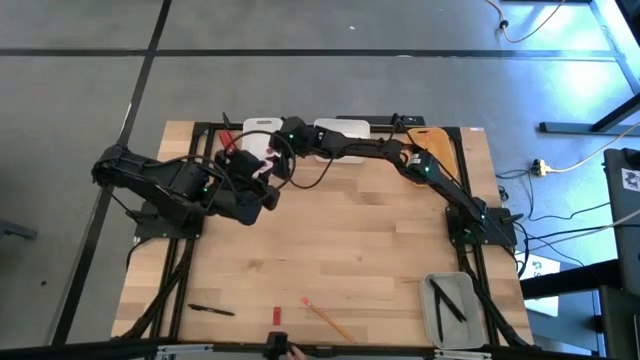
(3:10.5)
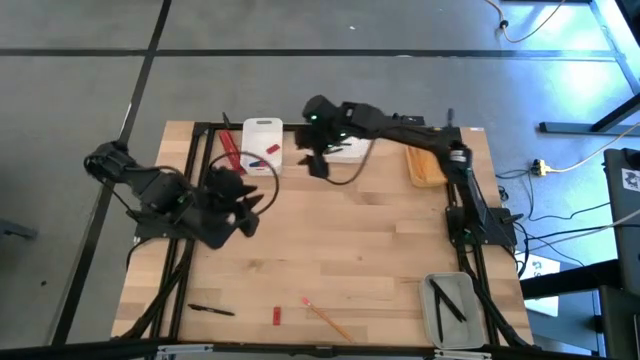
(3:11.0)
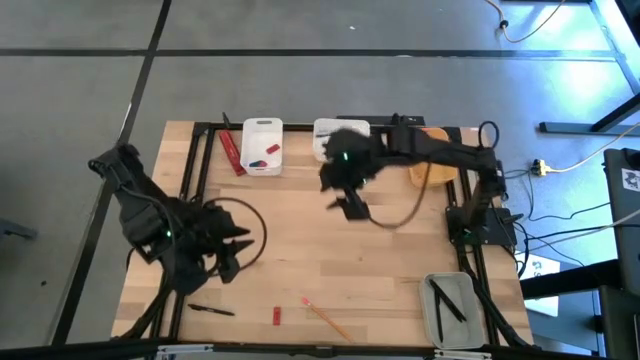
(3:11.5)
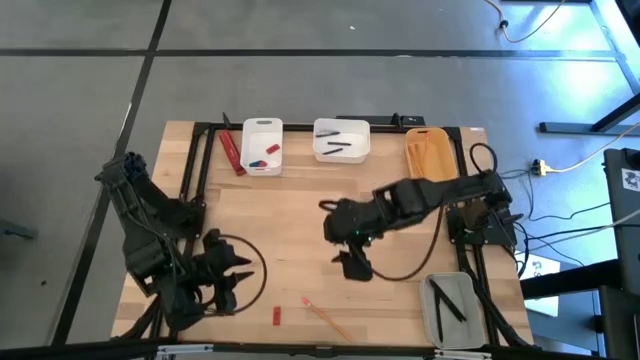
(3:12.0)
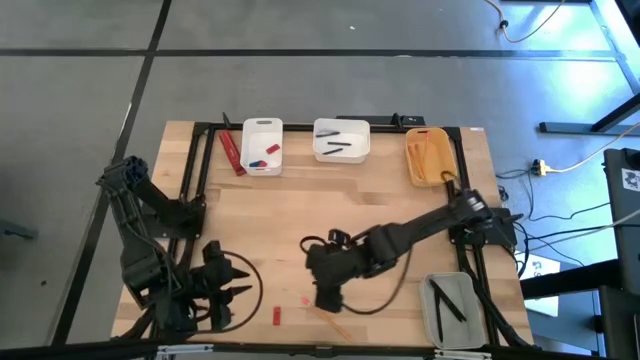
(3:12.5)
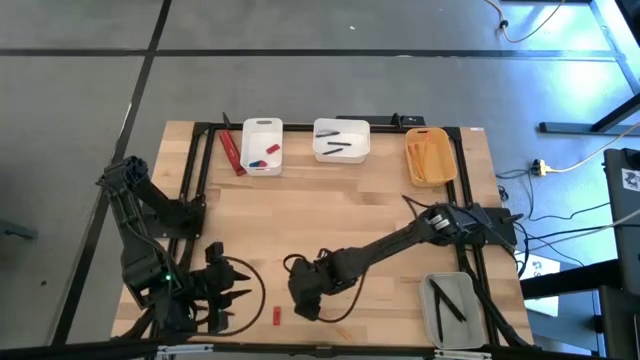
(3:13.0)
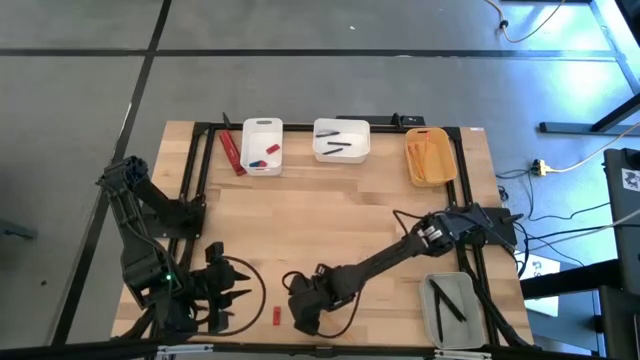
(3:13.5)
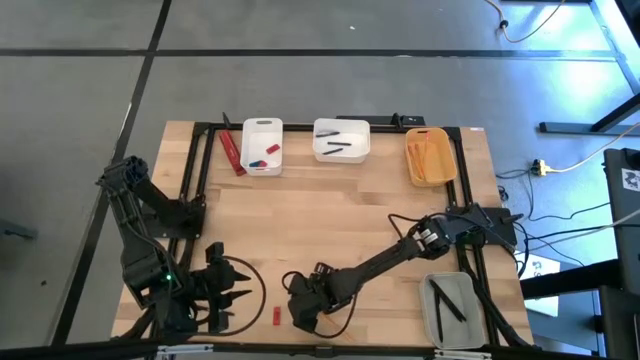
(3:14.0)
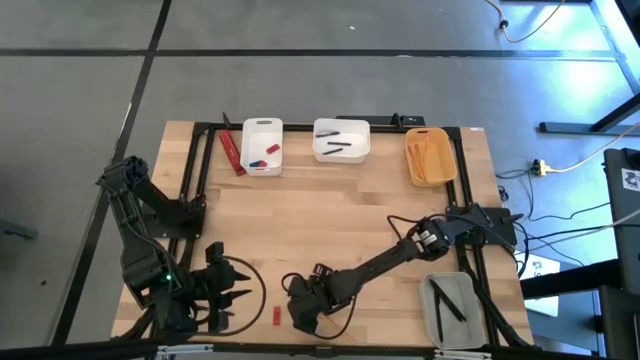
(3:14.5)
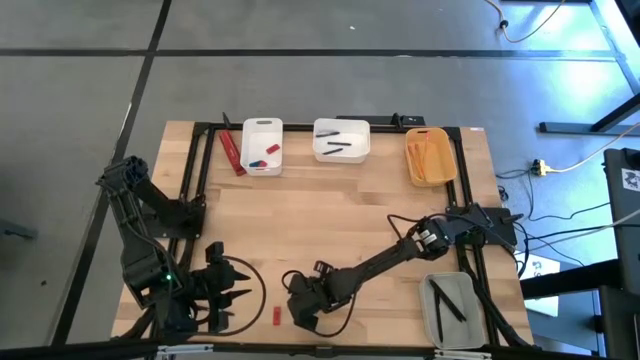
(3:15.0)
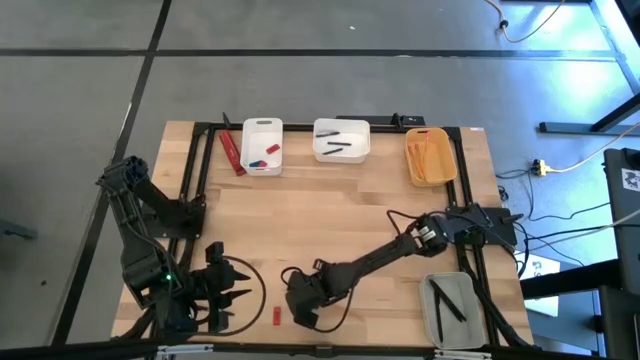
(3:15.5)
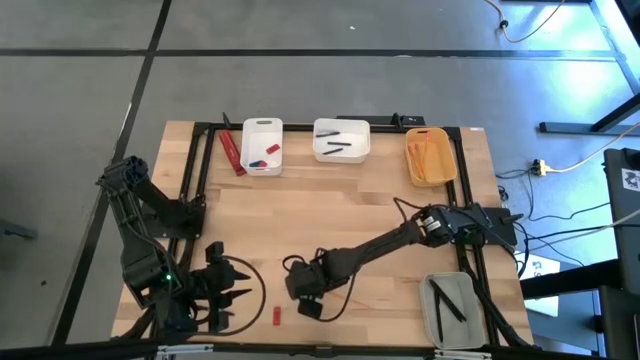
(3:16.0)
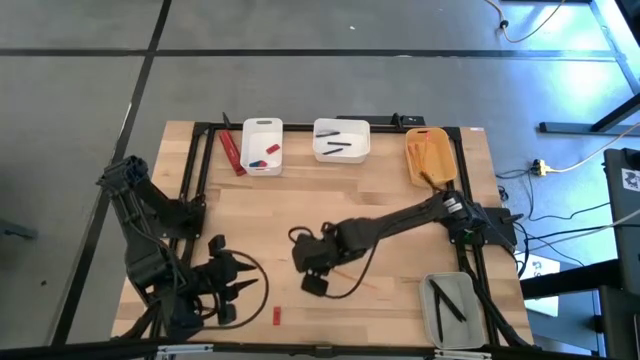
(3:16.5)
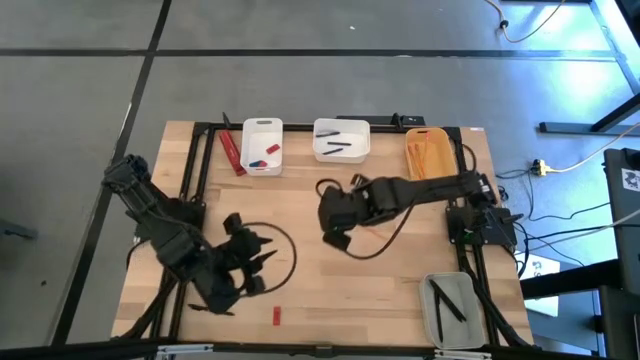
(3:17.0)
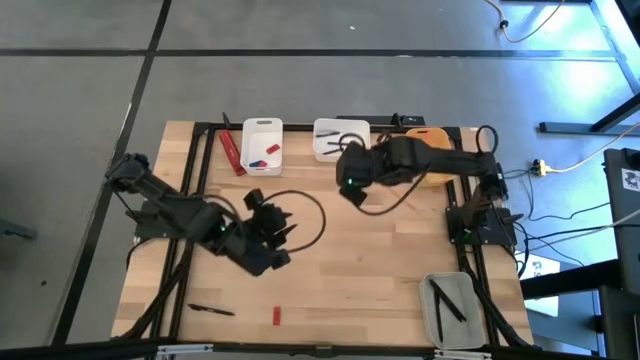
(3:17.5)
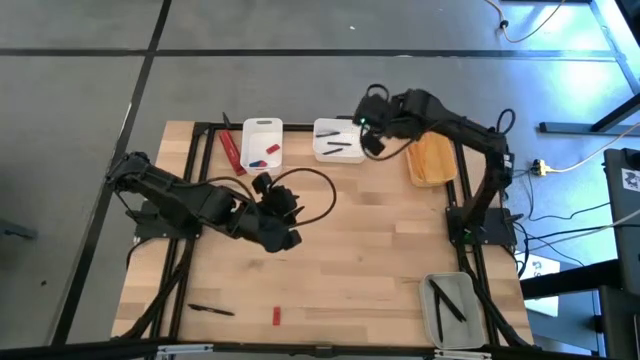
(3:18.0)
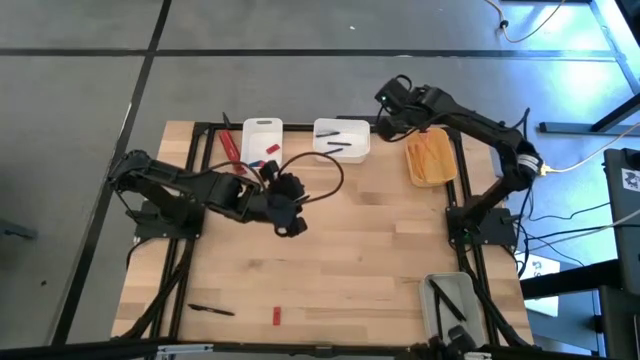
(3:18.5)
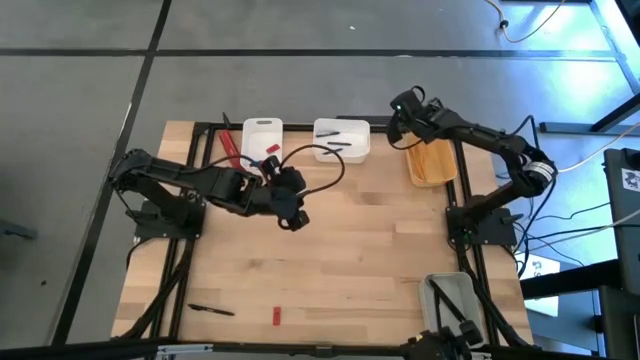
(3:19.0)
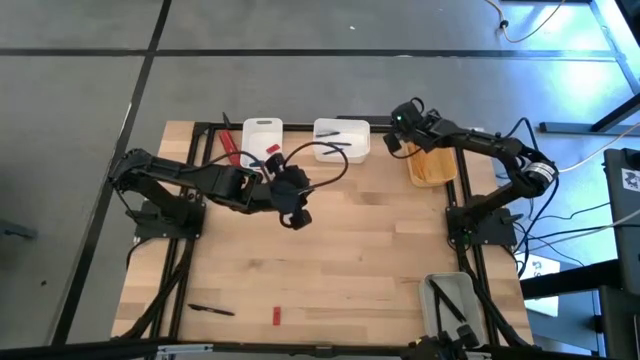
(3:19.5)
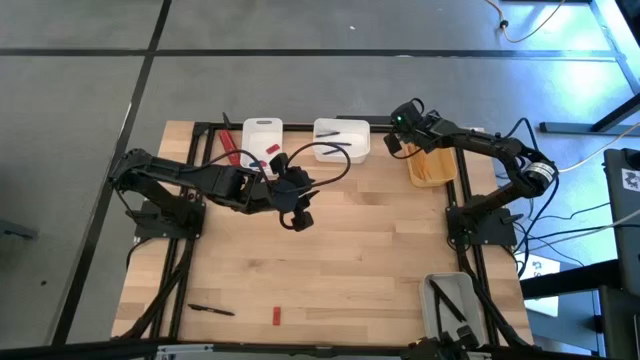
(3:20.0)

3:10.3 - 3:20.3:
Task: Sort crayons/erasers/pens/pencils in bins
Put the yellow pencil into the yellow bin

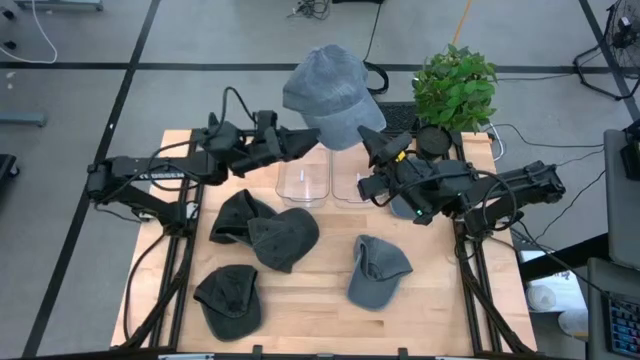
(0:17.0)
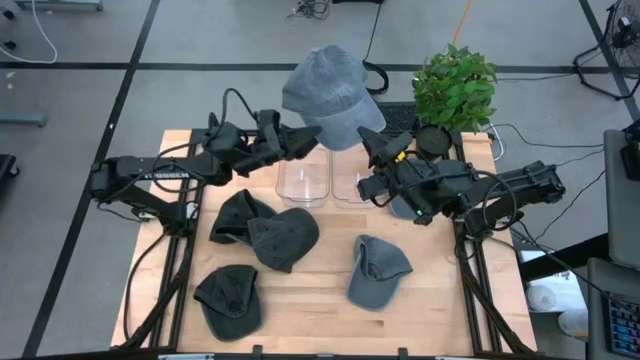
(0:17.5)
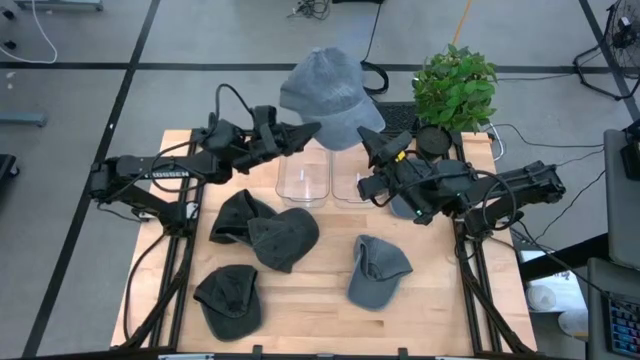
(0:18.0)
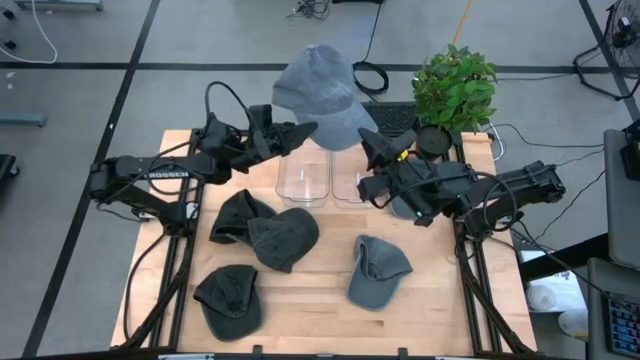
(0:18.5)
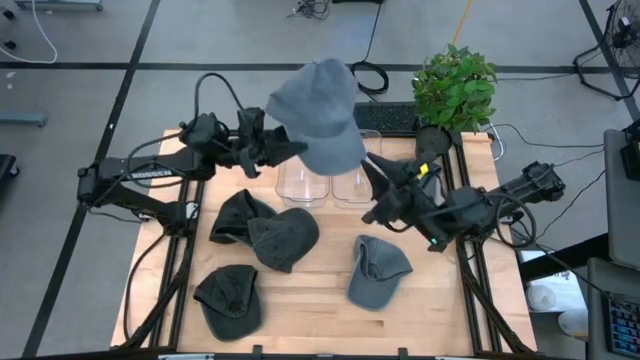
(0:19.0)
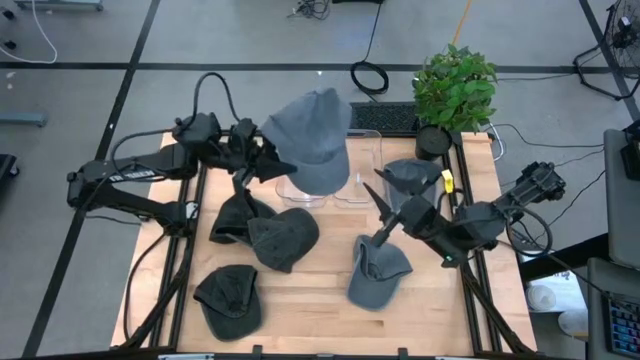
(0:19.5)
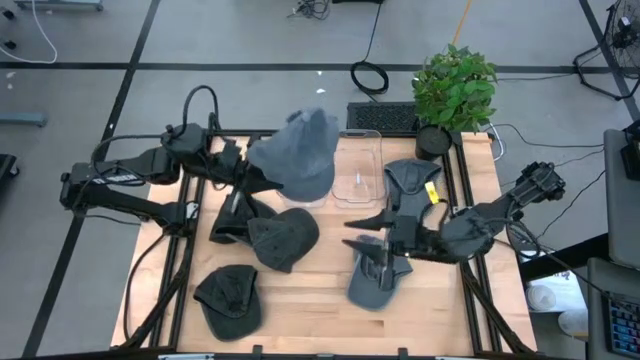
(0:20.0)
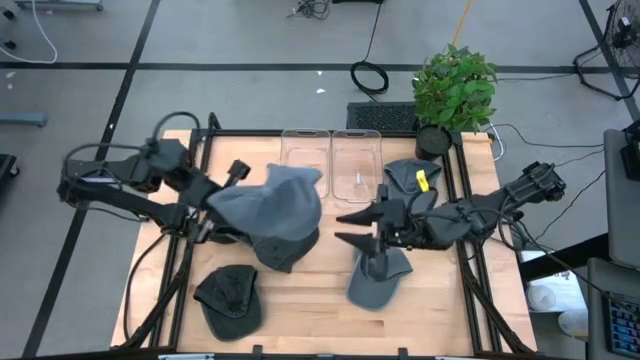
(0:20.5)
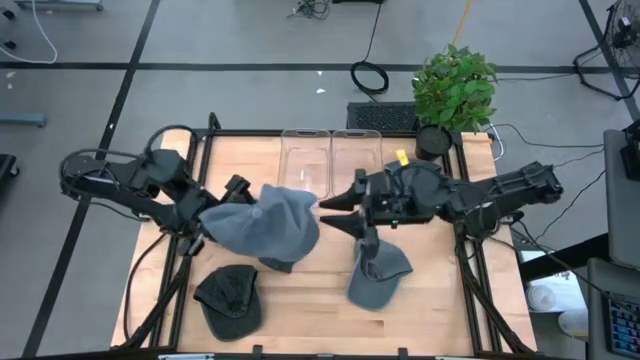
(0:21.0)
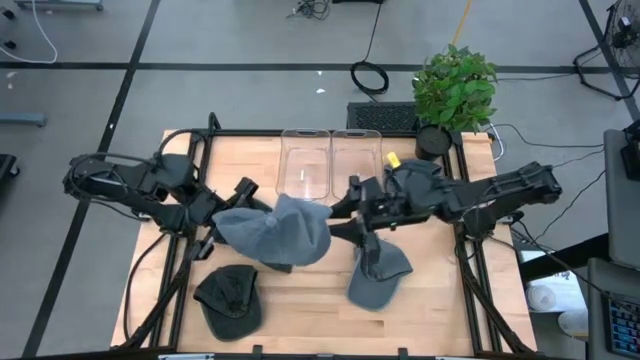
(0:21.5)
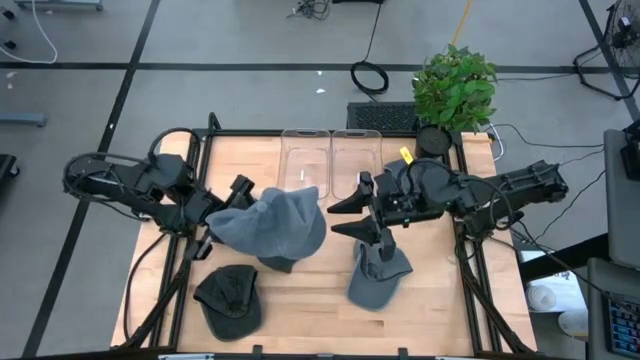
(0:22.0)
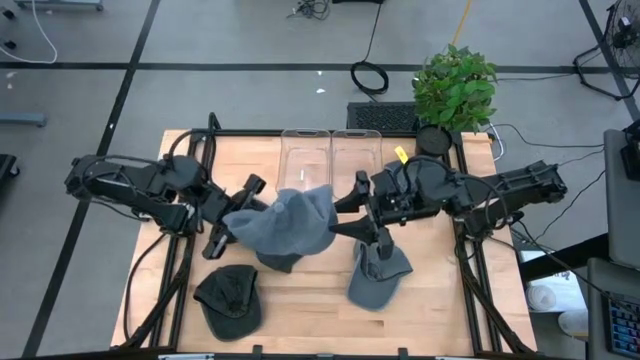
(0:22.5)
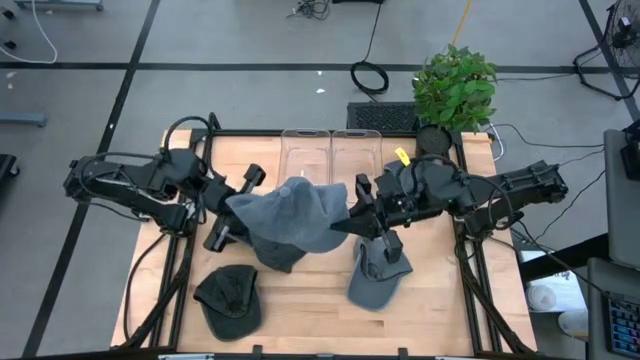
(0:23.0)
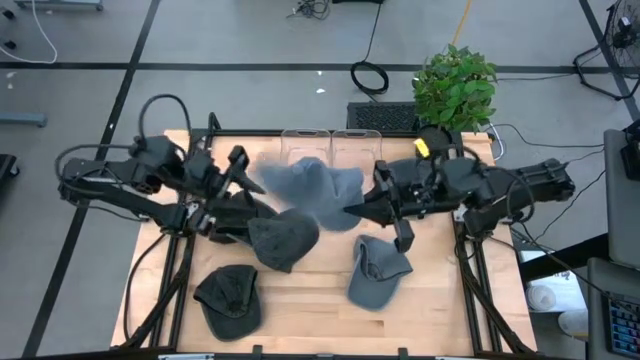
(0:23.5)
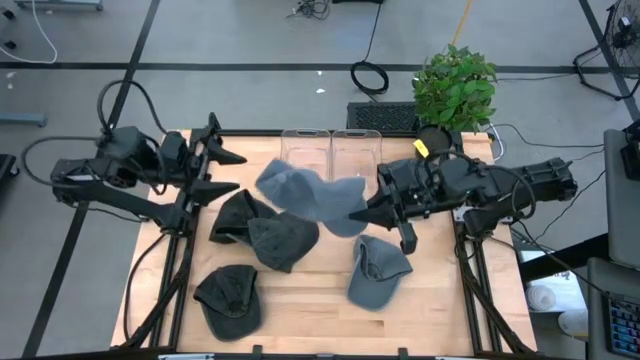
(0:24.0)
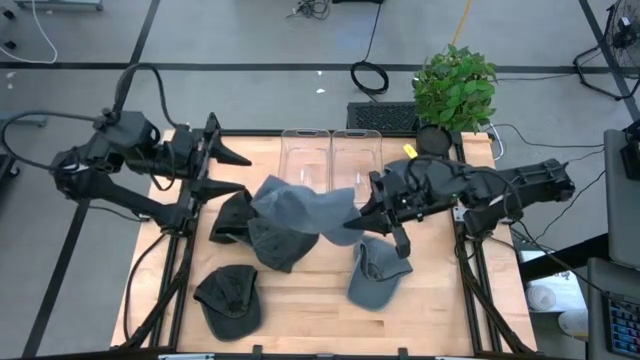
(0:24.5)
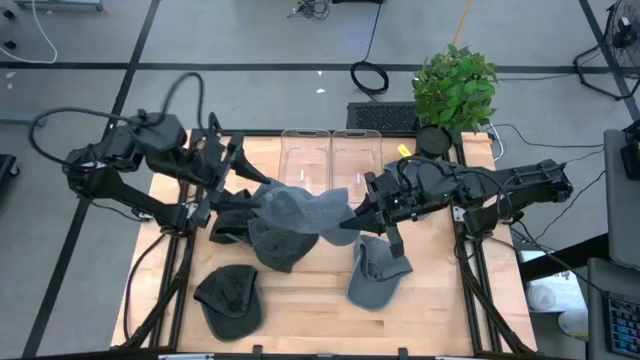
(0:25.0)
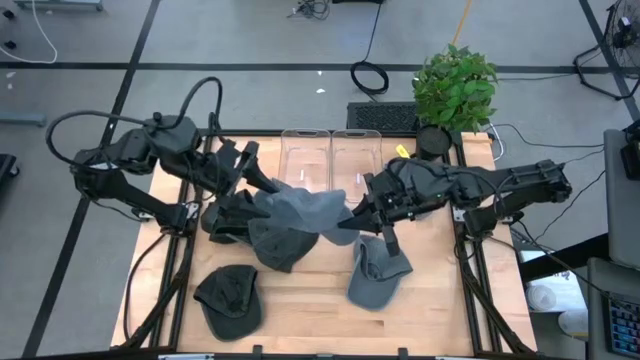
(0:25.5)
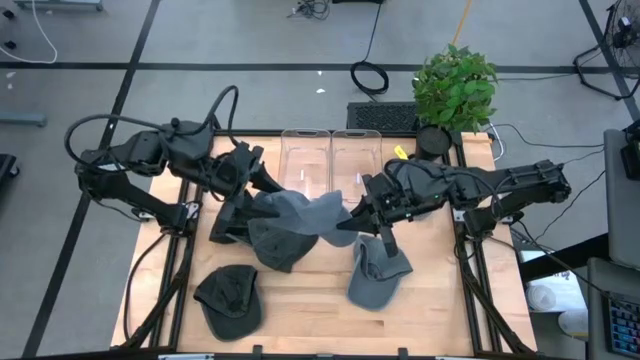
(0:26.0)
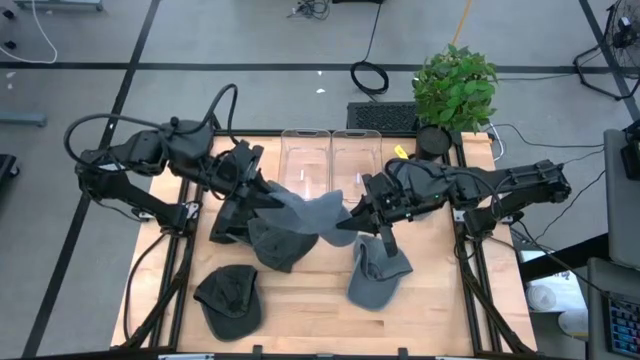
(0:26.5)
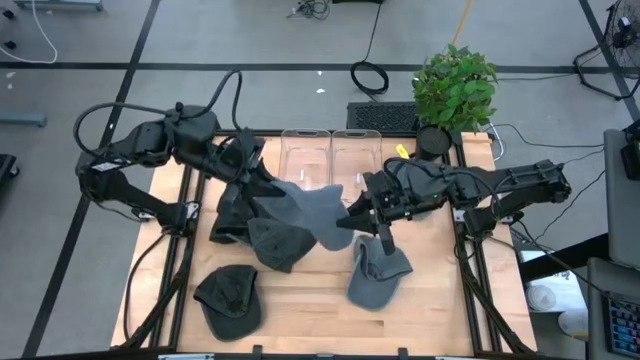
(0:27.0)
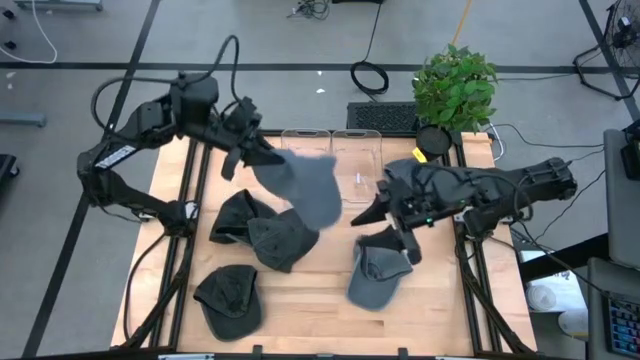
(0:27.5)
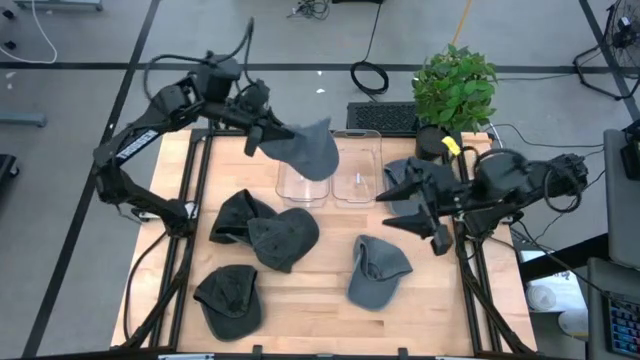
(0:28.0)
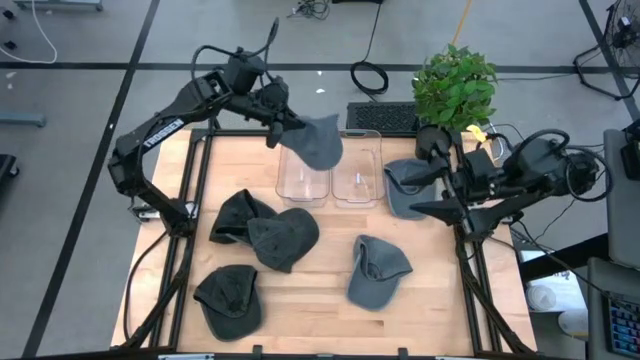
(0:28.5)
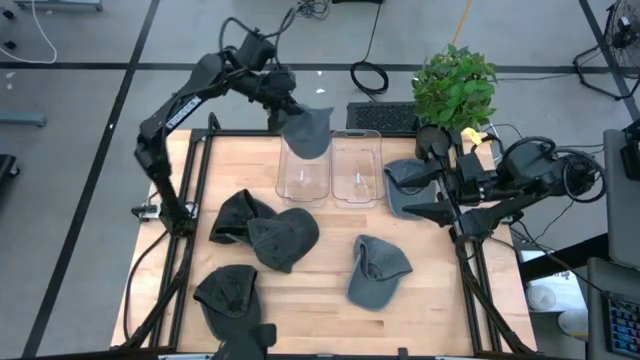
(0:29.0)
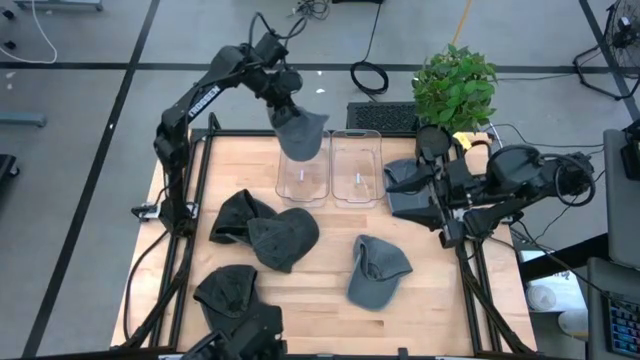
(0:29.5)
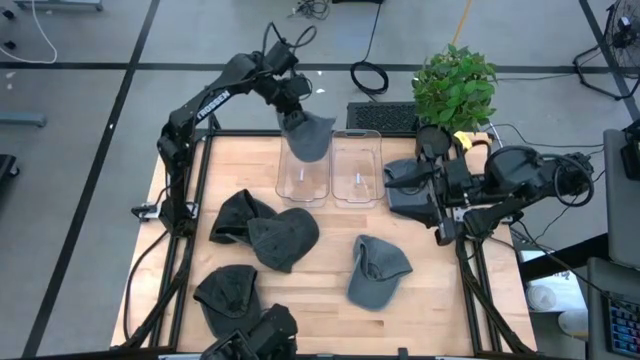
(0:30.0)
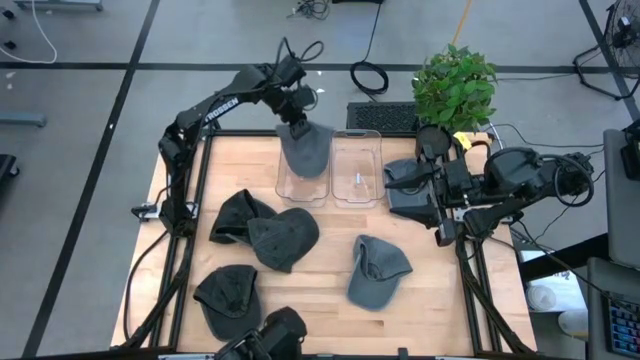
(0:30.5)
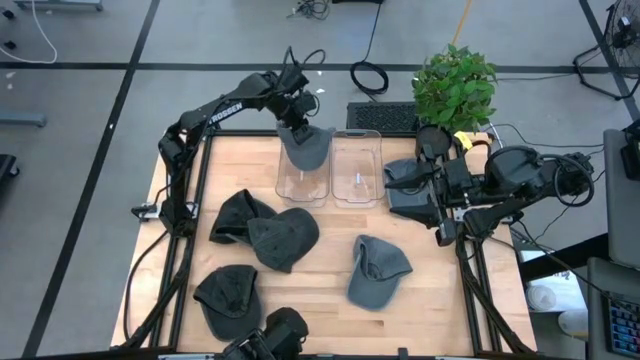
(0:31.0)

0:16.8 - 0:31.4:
Task: Pick & Place hat
Put the bottom gray cap into the left transparent bin
